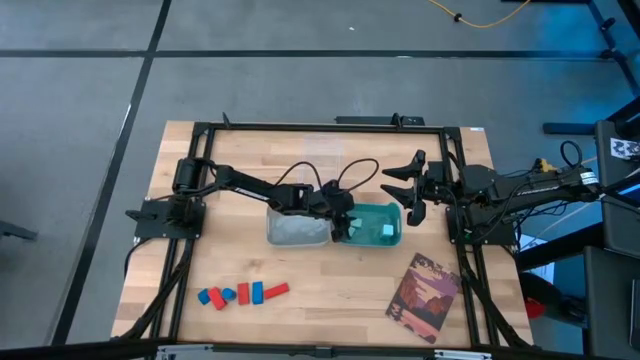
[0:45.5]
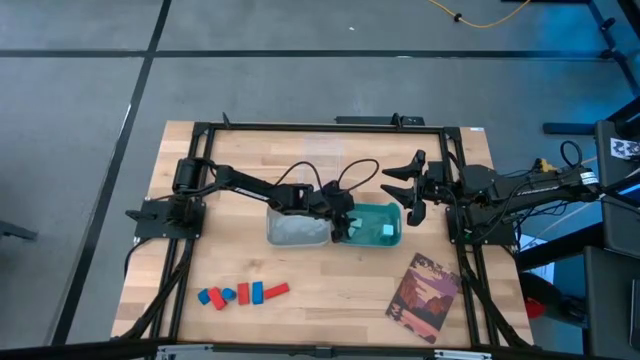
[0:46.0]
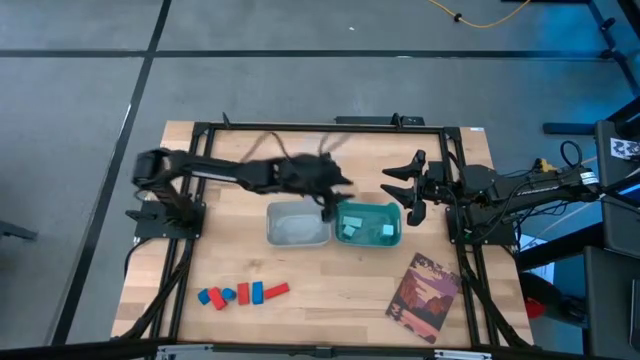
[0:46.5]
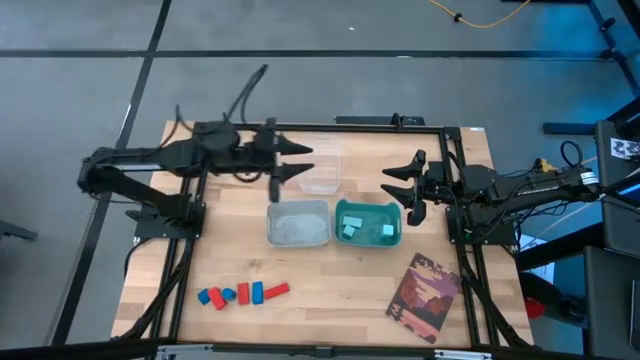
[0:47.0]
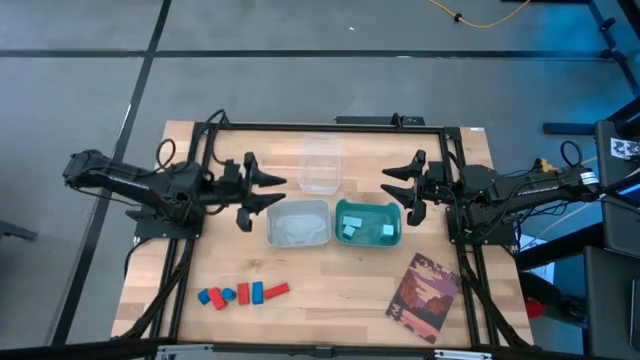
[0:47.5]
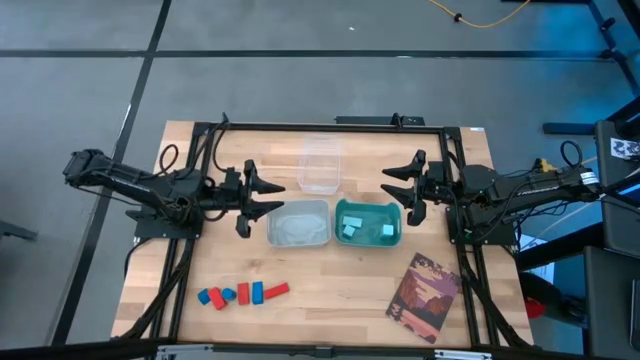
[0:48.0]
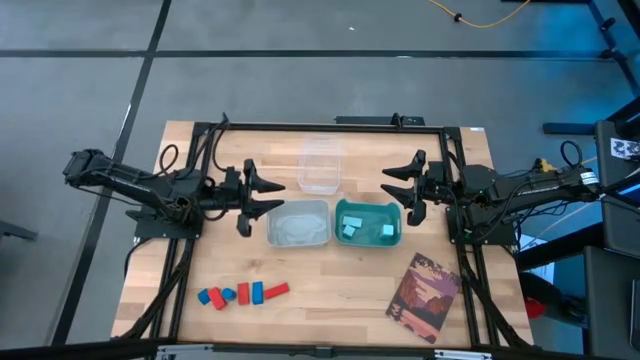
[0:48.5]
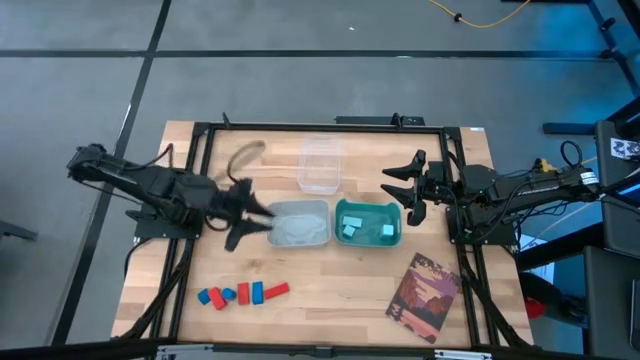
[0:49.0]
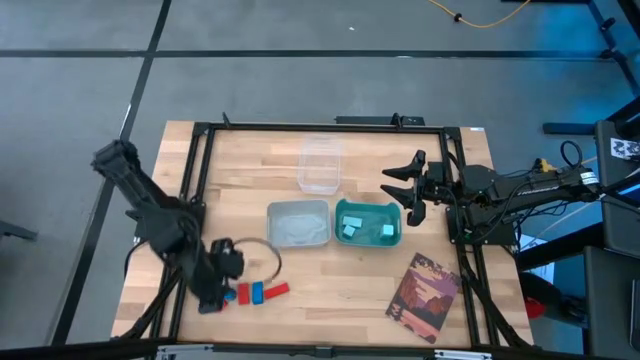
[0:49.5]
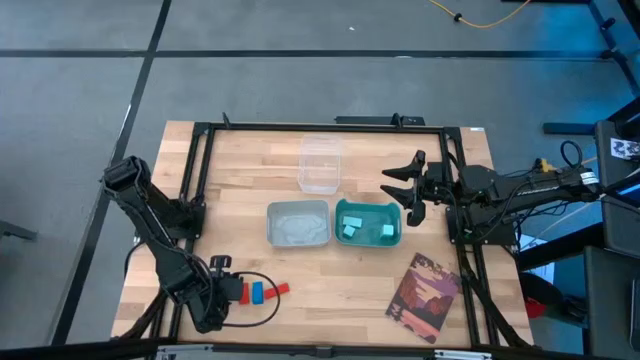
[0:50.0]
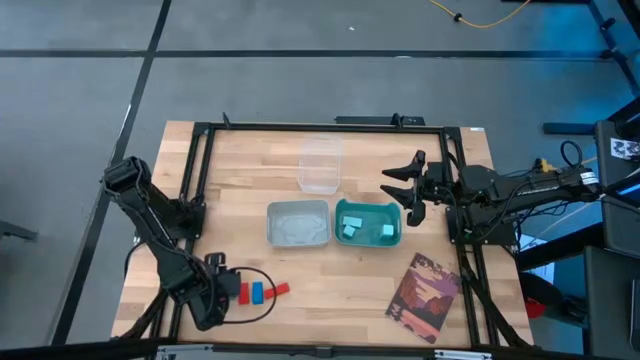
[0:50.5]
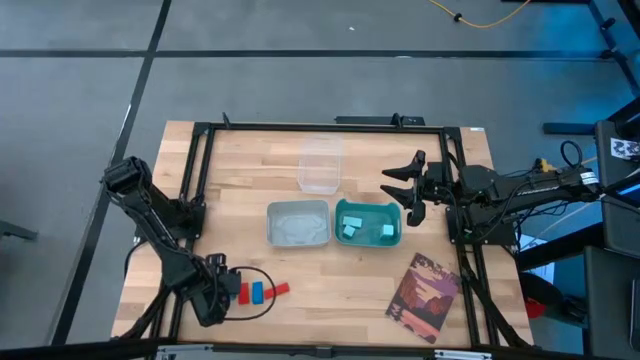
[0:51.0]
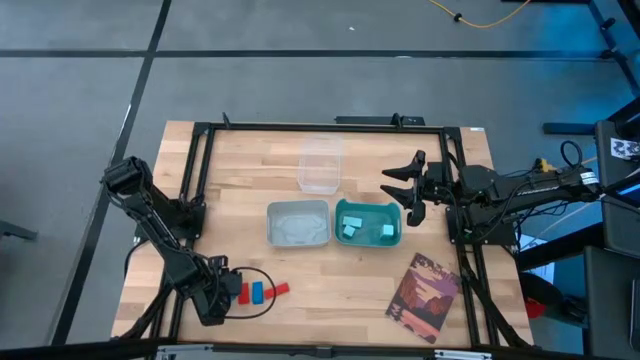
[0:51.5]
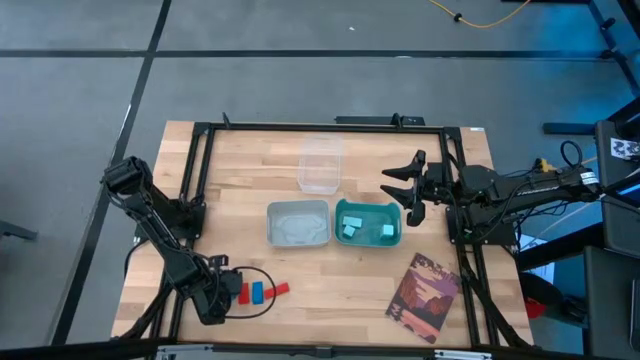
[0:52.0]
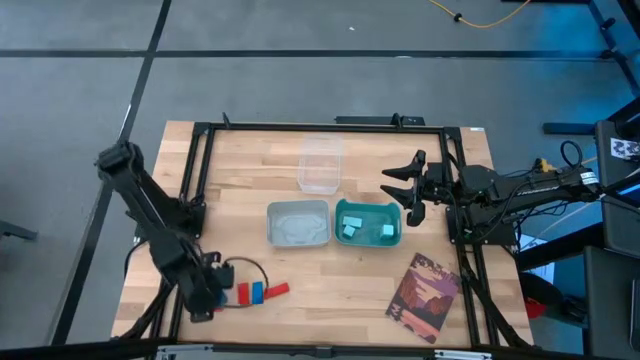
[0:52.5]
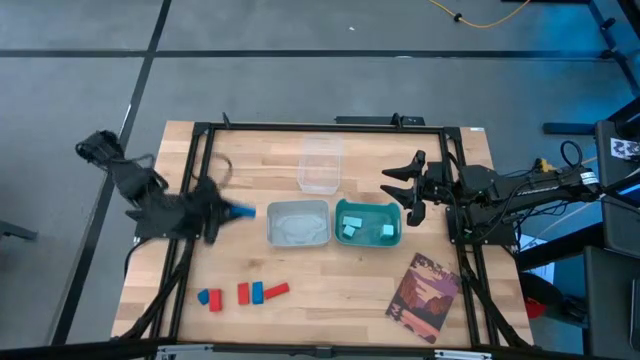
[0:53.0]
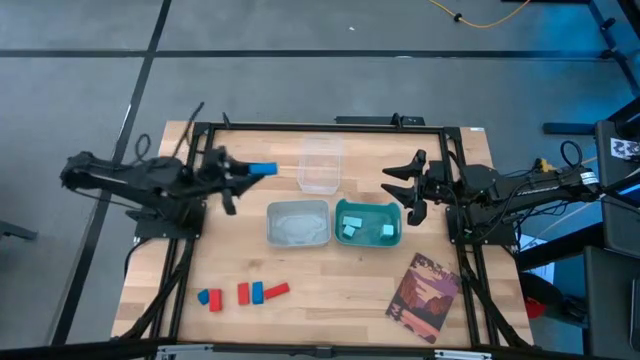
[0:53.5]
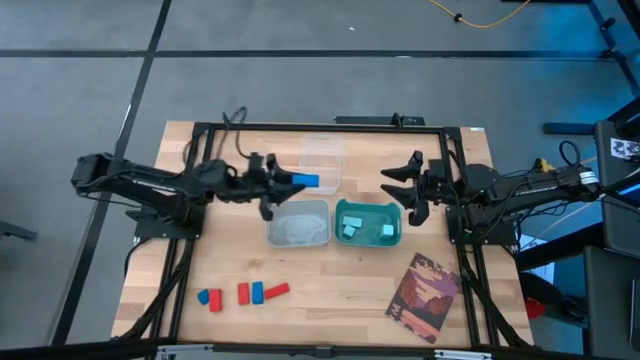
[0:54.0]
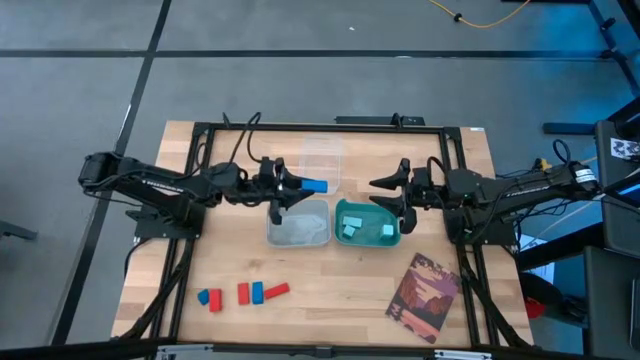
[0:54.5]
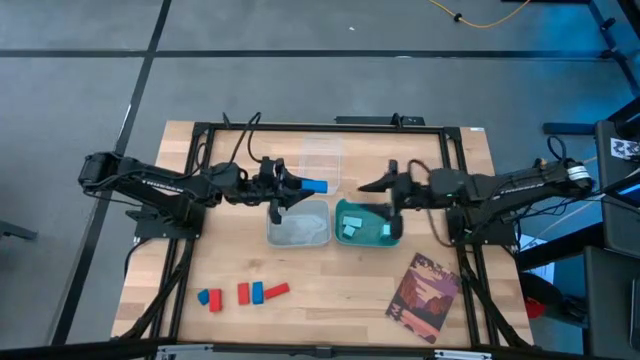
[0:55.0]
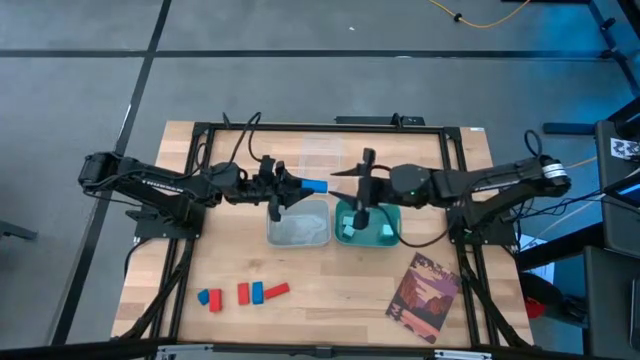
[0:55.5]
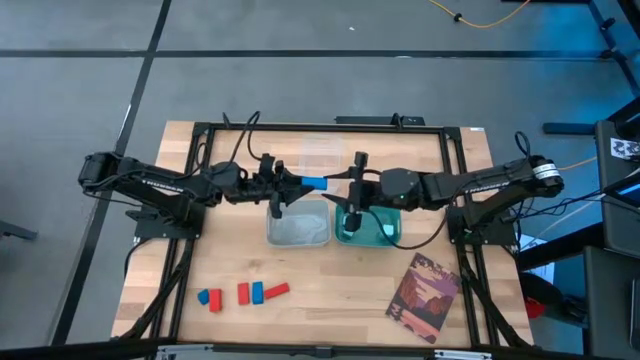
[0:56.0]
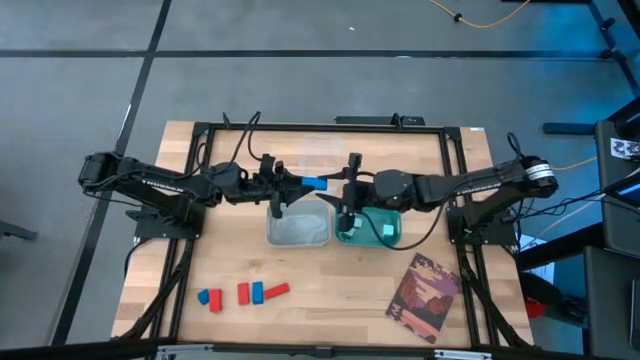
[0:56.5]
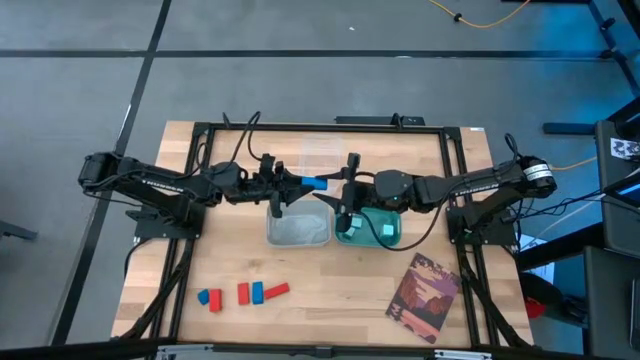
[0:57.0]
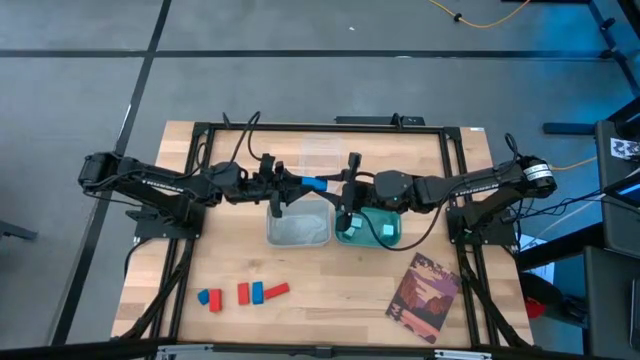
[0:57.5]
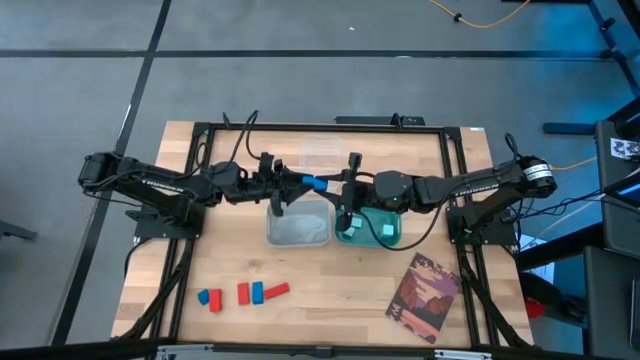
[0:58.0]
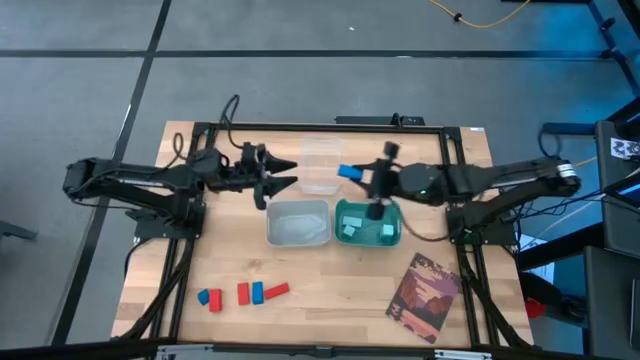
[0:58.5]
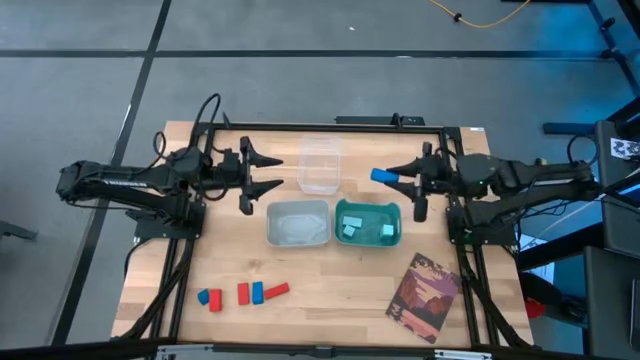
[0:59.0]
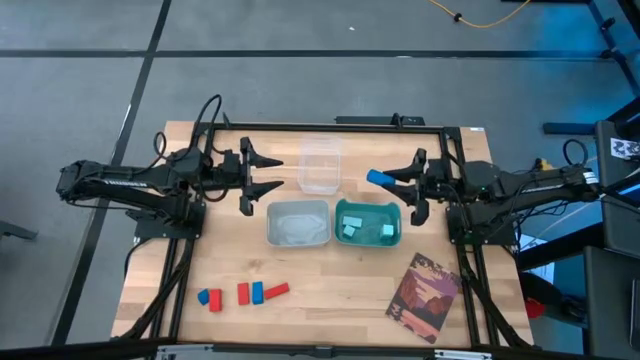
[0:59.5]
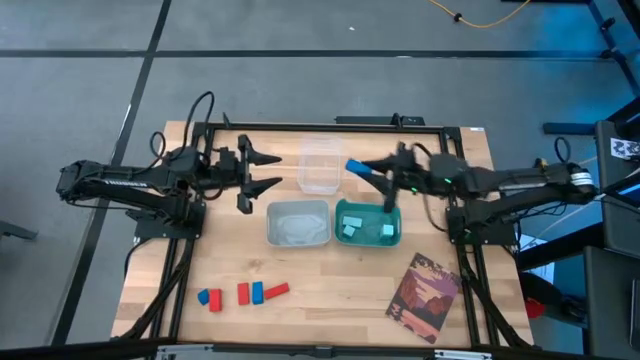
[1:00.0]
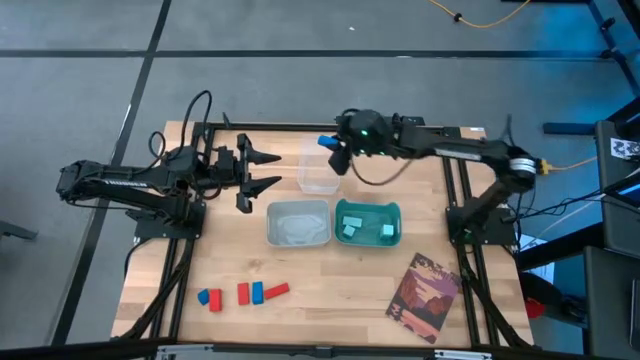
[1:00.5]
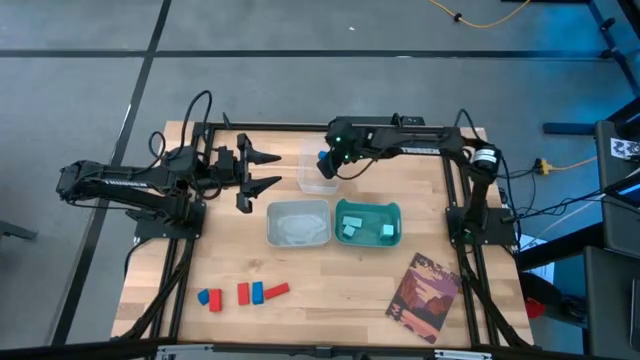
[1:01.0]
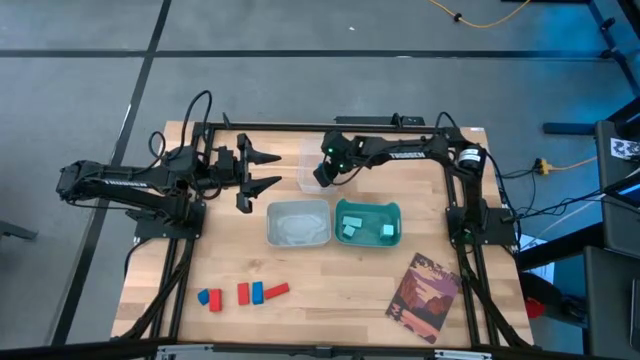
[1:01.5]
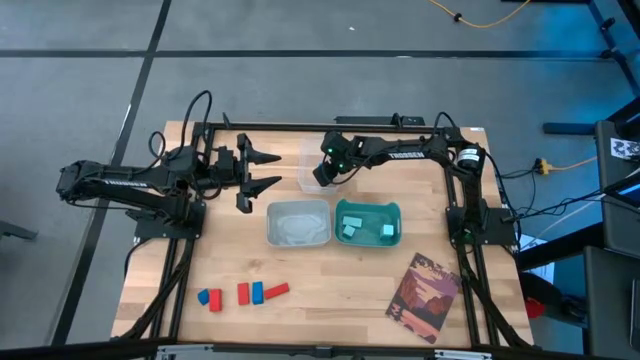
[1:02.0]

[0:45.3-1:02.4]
Task: Sort & place blocks by color
Put the center blue block into the transparent bin

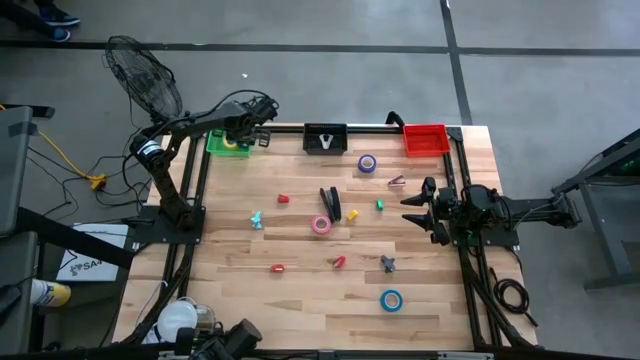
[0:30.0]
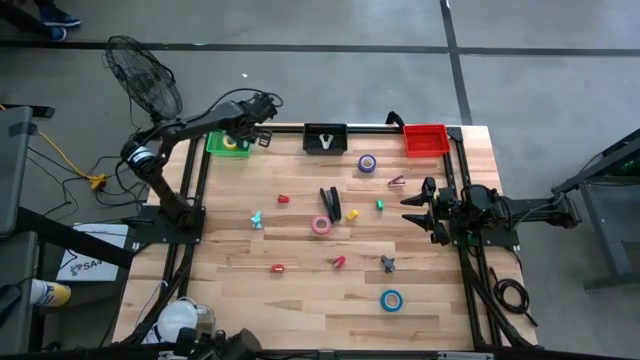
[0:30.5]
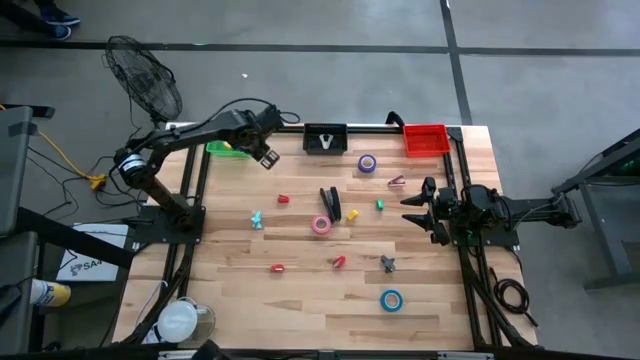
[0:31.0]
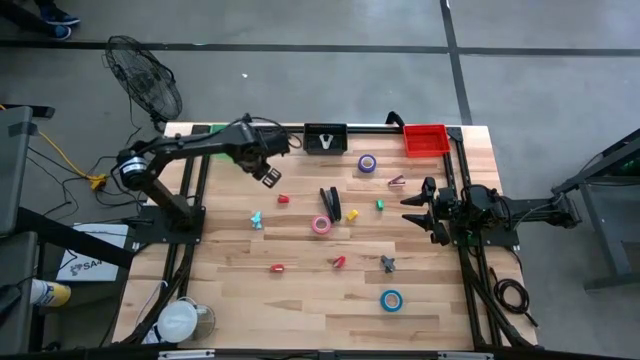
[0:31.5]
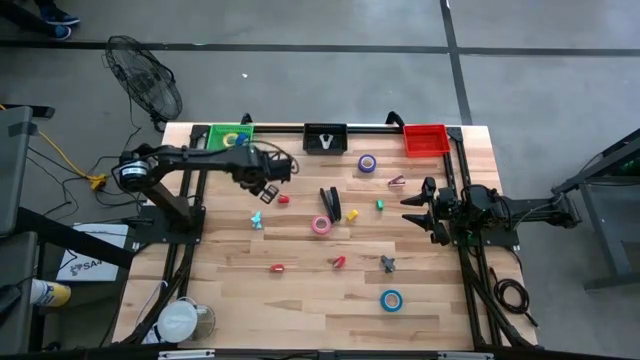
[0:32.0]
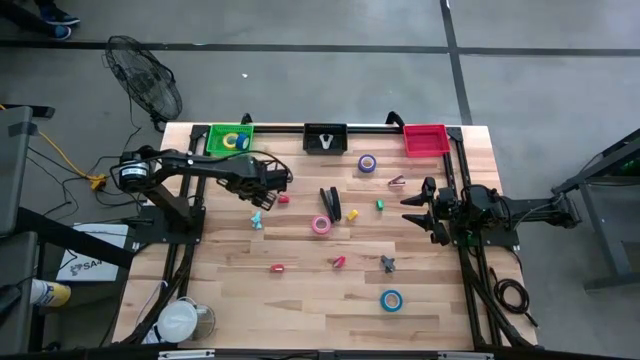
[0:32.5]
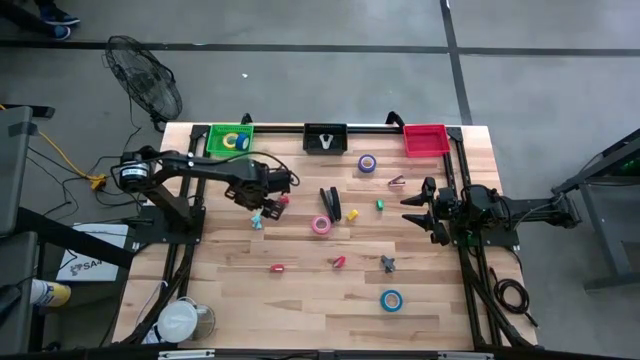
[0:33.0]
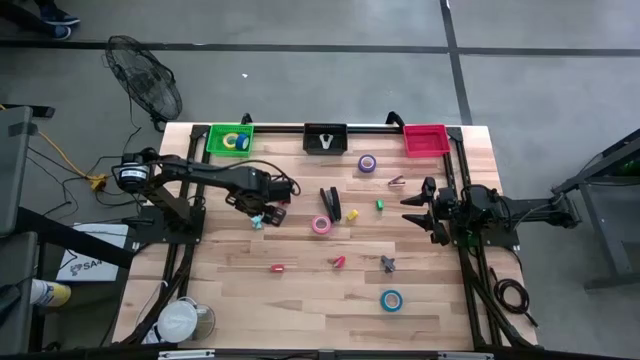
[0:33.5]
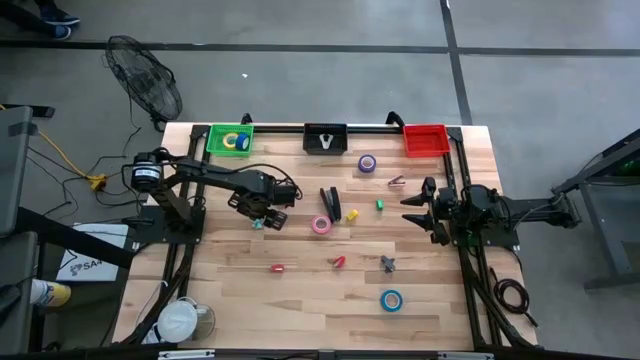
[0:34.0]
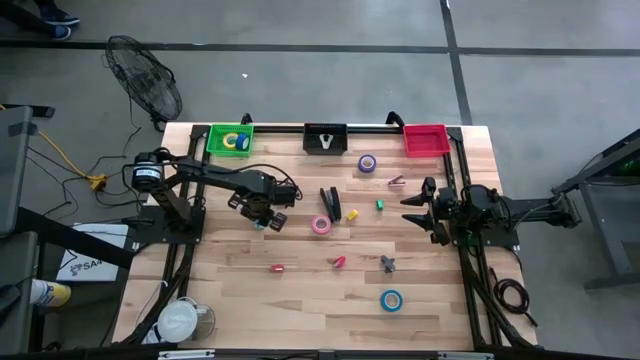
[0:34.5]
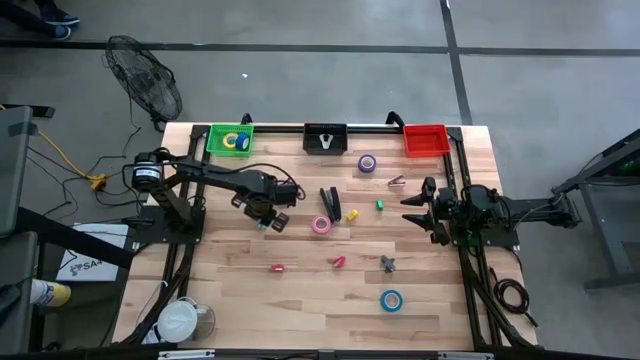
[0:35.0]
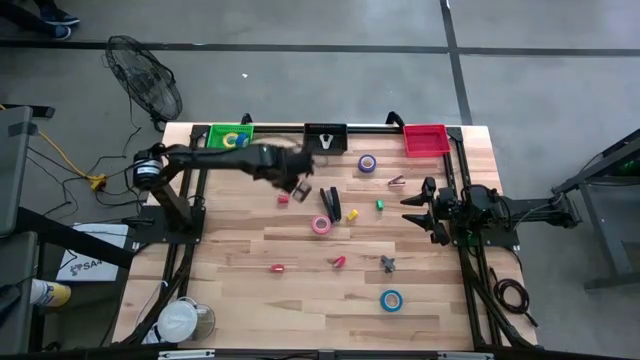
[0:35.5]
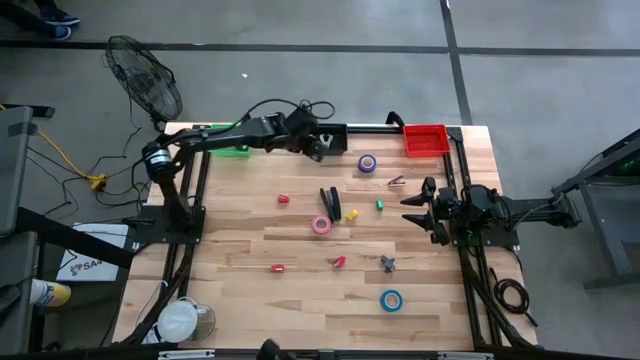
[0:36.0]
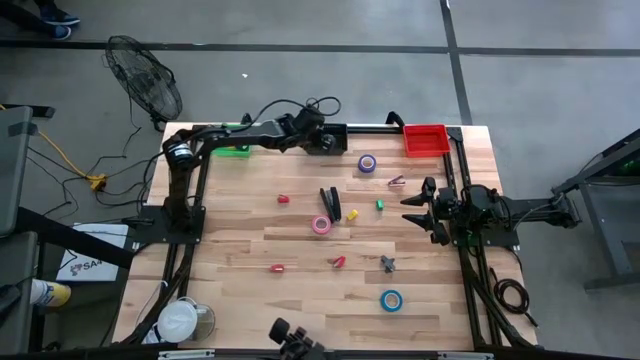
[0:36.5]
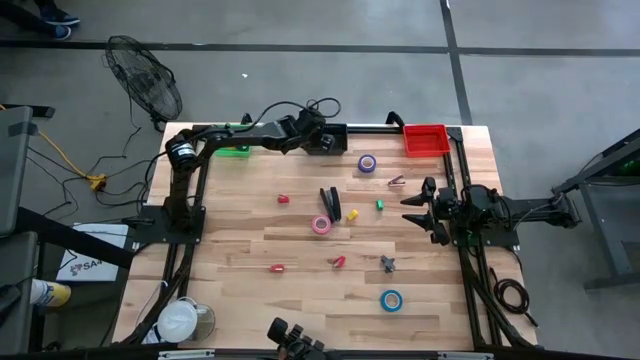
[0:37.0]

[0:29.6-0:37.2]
Task: Pick and place Stapler, Stapler remover, tape
Put the light blue staple remover in the black bin
